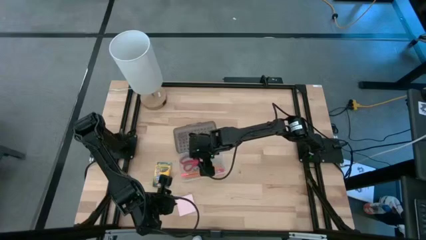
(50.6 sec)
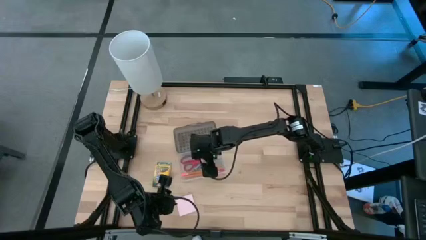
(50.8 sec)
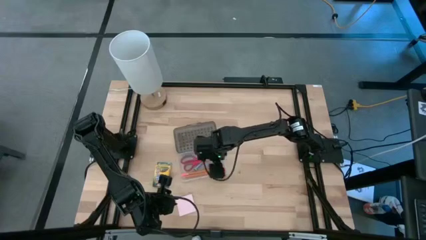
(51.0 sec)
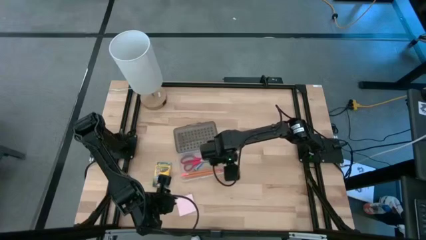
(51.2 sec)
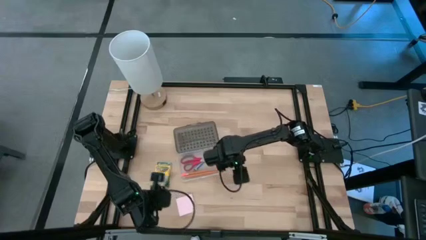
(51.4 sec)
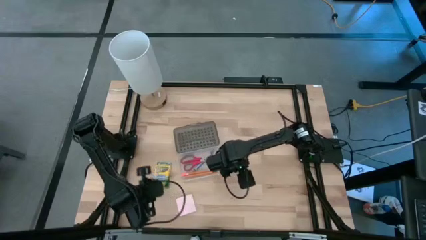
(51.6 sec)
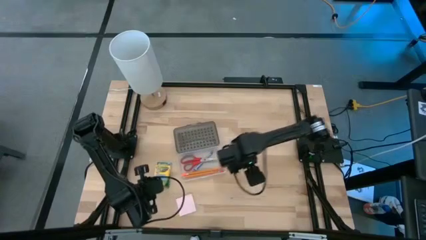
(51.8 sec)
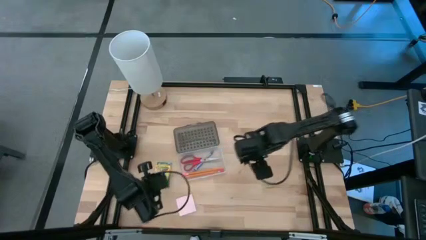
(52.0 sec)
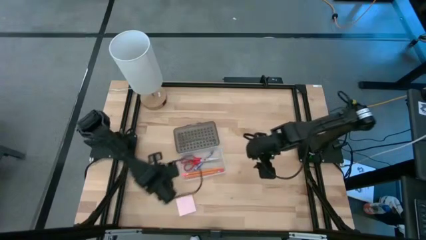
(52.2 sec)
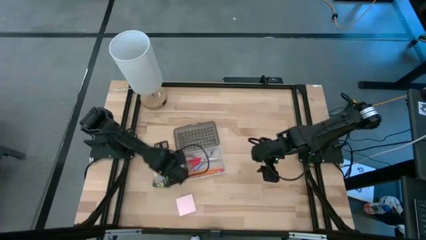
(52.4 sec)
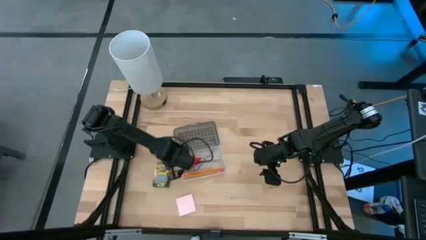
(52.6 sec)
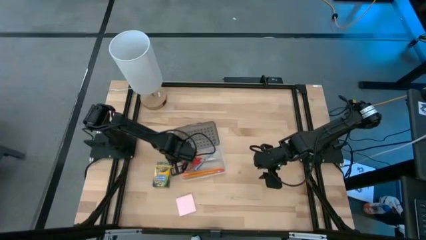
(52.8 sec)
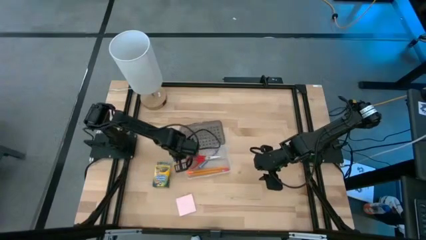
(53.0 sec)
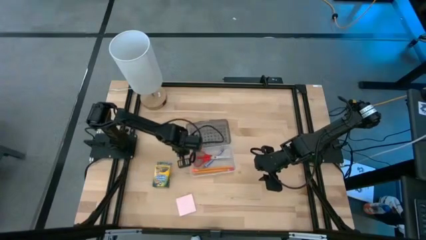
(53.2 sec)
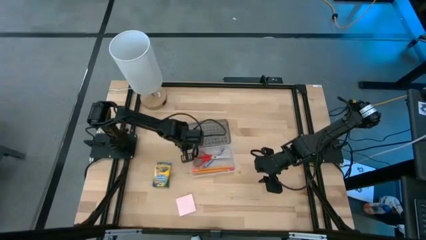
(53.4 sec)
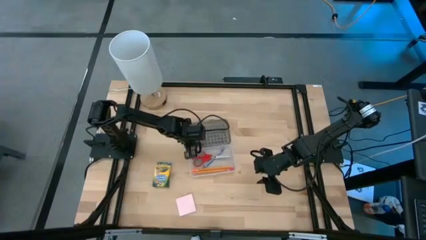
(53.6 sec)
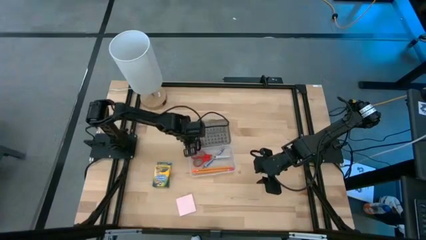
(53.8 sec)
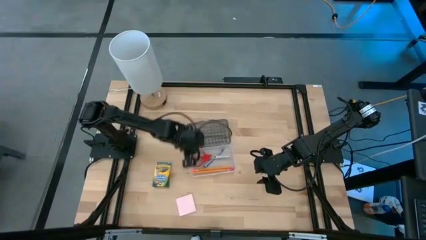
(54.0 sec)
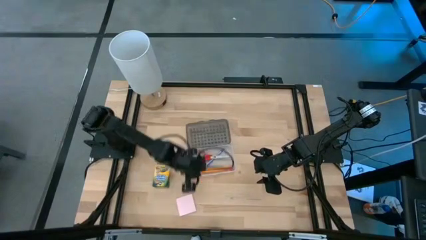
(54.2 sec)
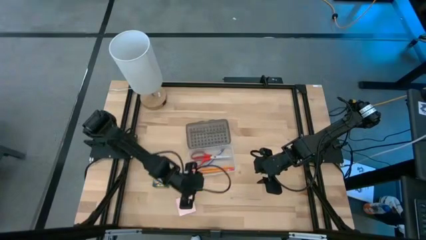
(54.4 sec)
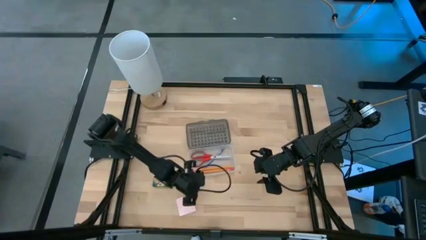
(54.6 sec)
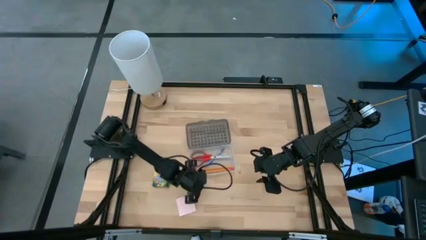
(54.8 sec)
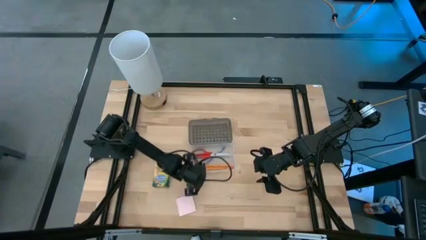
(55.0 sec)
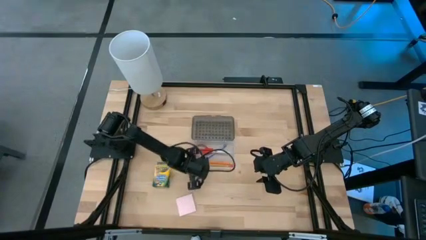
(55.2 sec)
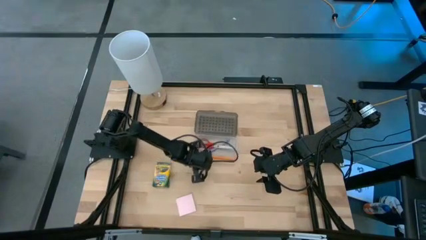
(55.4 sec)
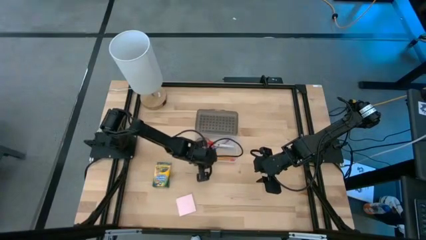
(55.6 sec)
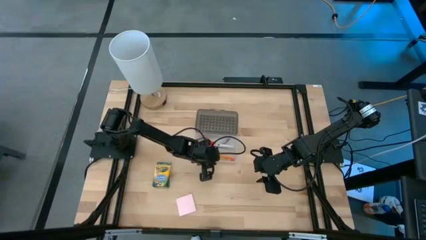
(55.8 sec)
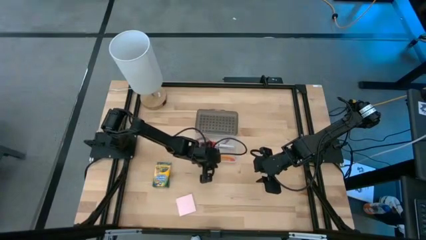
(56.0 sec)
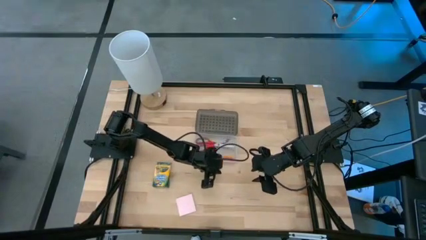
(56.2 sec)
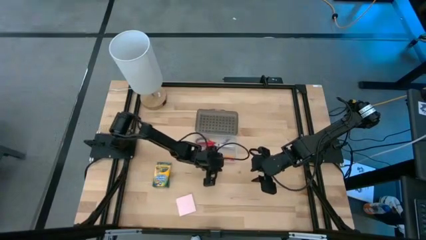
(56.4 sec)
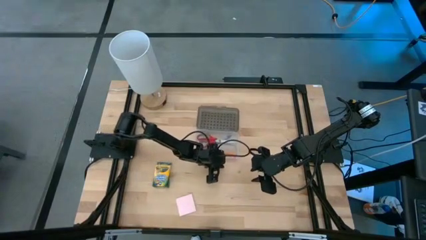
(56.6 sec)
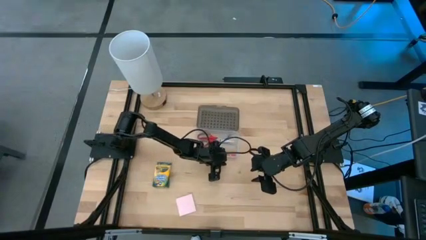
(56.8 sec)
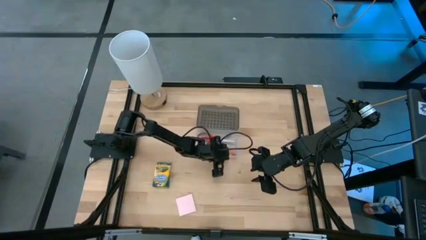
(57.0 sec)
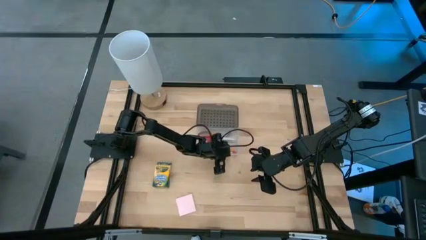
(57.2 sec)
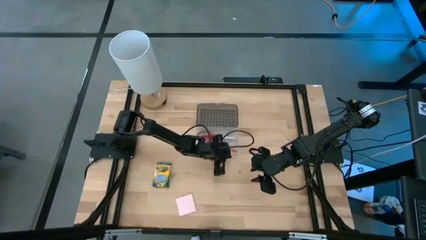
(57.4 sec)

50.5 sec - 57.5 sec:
Task: Pack school essentials
Adjust the gray supply box

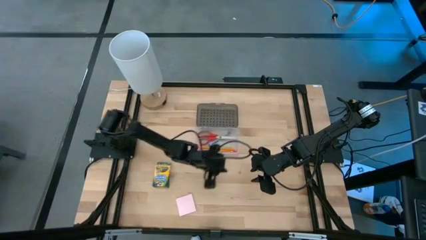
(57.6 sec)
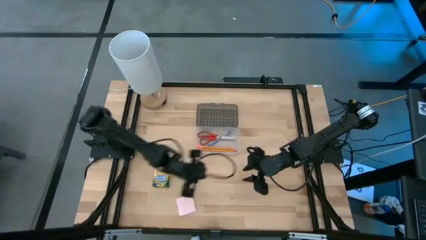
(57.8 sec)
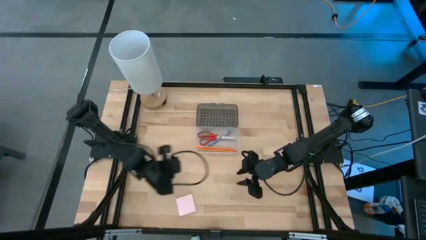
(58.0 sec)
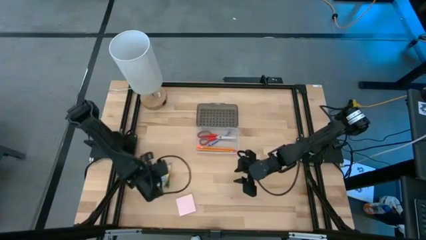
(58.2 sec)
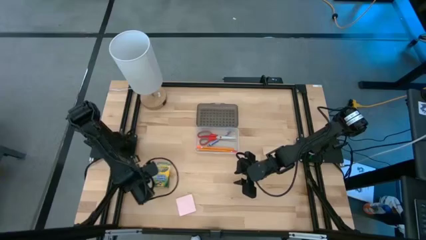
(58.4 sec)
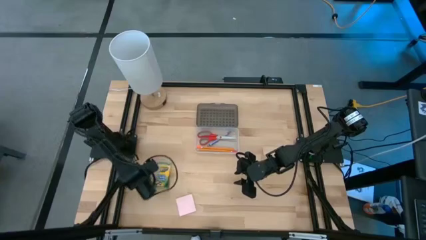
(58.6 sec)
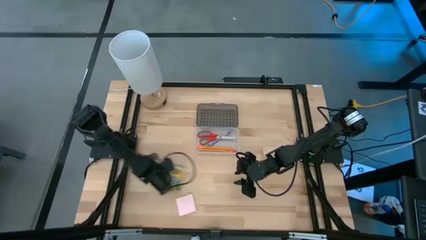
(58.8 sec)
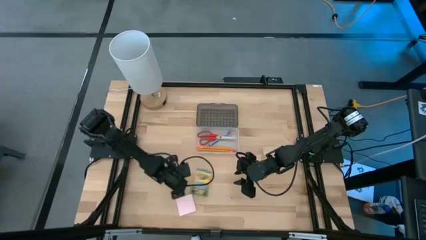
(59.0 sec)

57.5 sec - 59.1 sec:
Move the yellow crayon box to the center of the table

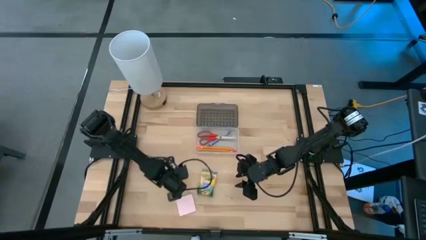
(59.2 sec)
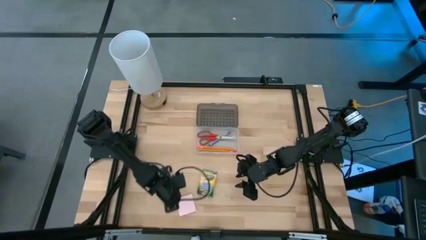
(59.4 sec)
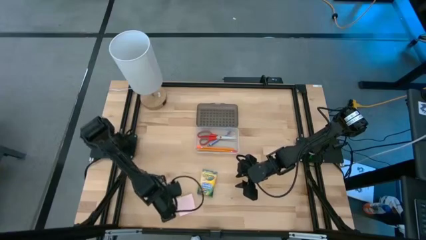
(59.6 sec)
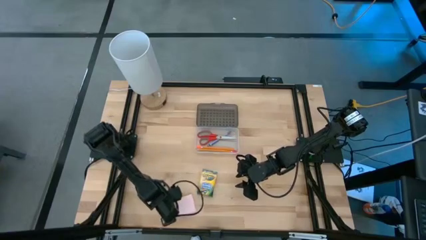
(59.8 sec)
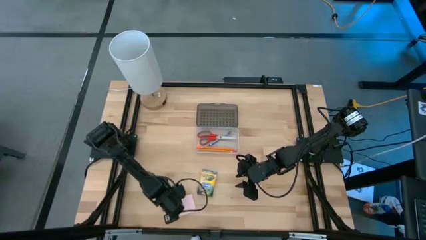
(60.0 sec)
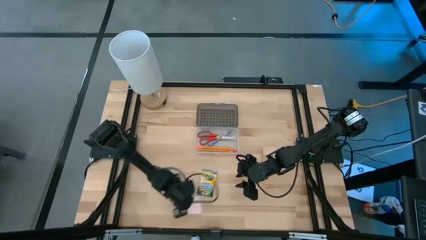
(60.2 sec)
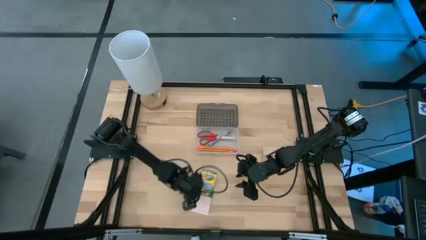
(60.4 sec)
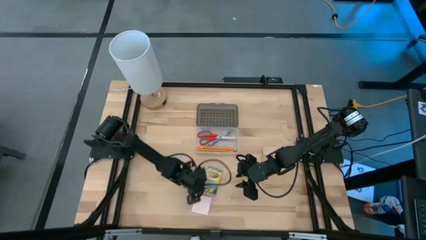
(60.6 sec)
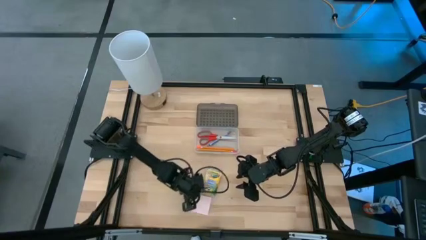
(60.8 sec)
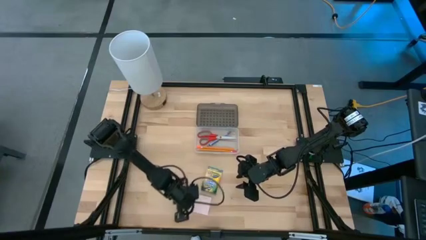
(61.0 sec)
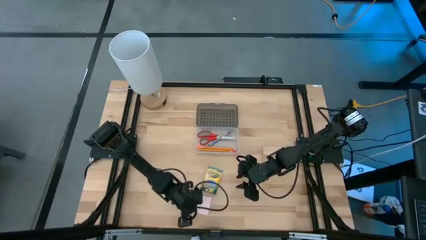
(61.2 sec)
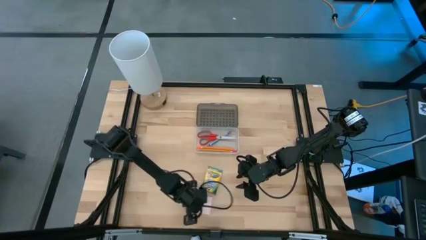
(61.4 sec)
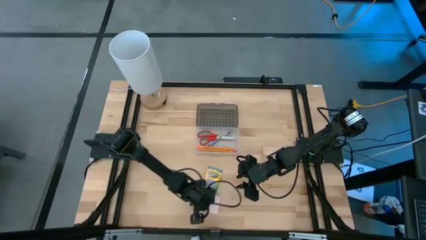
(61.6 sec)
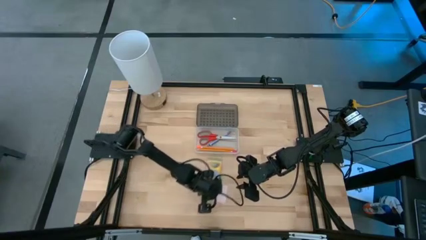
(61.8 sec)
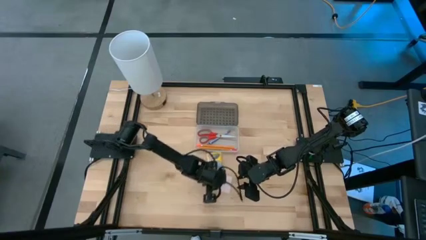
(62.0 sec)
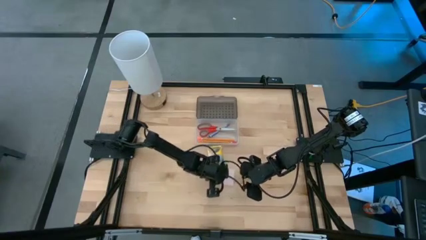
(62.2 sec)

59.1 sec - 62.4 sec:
Move the light pink sticky note to the center of the table

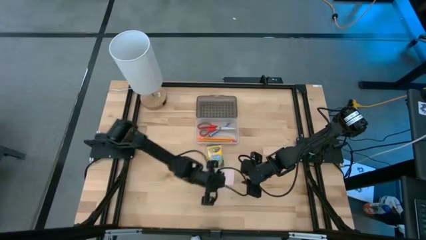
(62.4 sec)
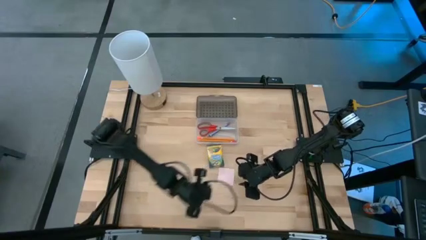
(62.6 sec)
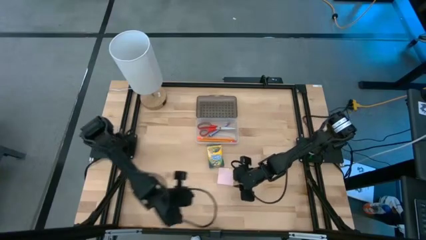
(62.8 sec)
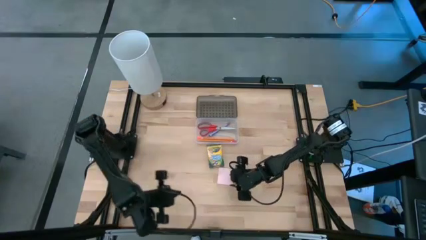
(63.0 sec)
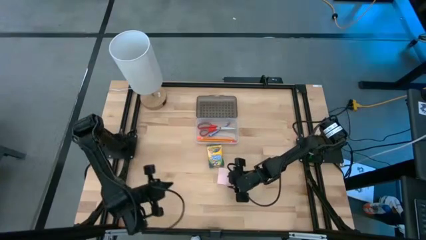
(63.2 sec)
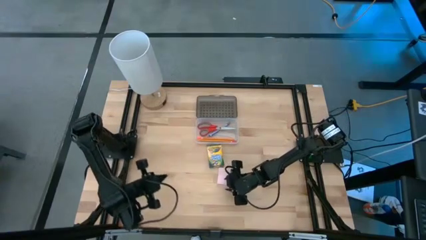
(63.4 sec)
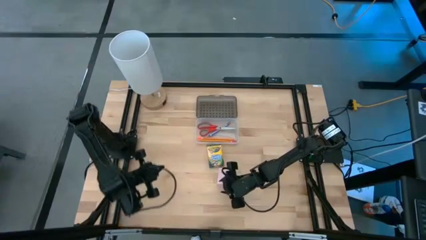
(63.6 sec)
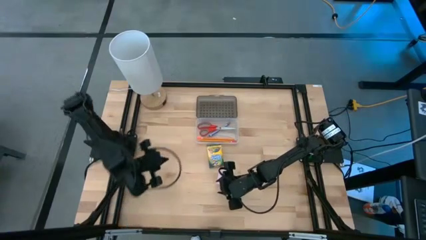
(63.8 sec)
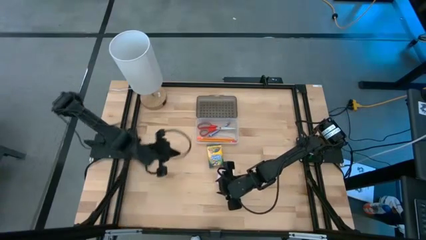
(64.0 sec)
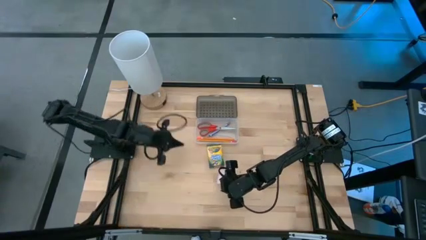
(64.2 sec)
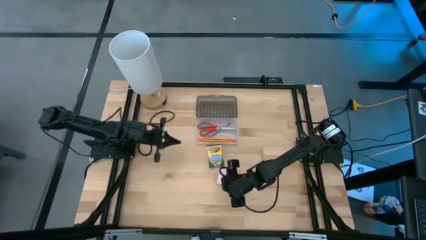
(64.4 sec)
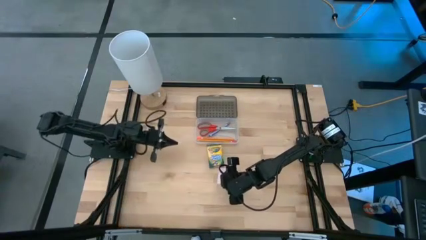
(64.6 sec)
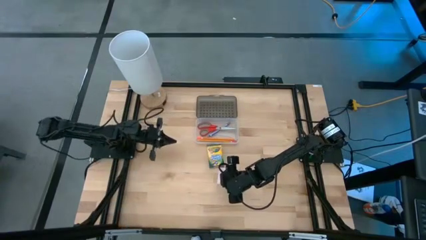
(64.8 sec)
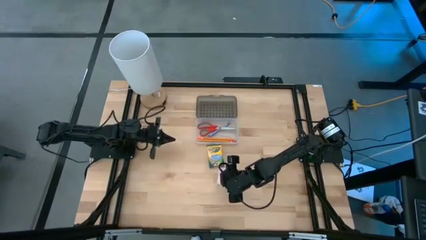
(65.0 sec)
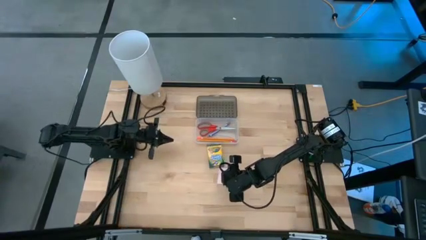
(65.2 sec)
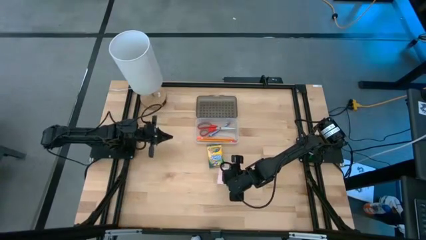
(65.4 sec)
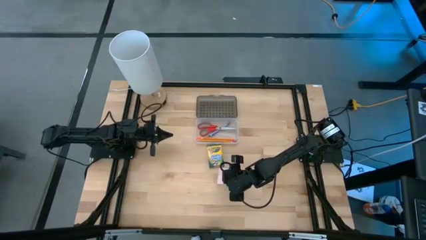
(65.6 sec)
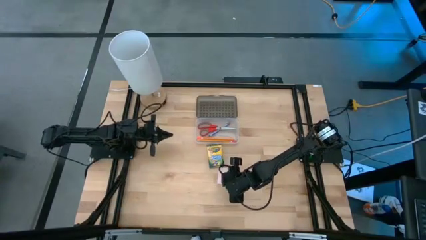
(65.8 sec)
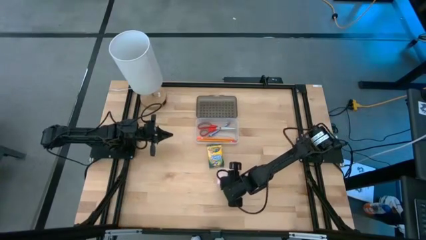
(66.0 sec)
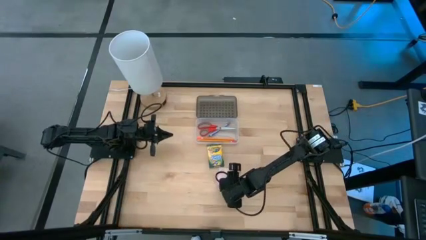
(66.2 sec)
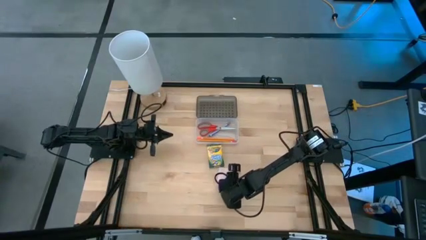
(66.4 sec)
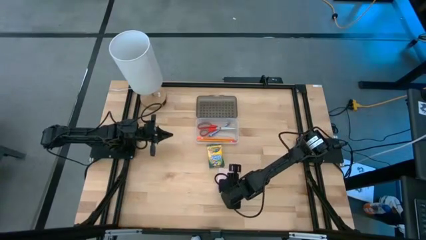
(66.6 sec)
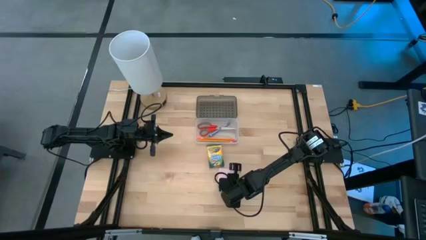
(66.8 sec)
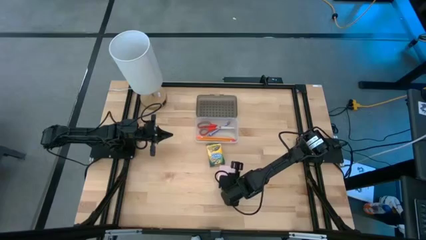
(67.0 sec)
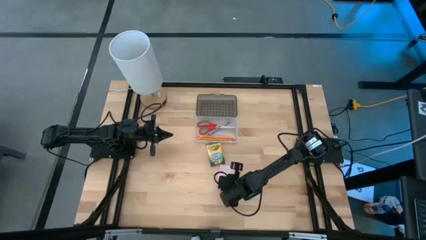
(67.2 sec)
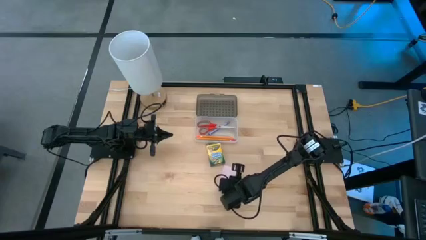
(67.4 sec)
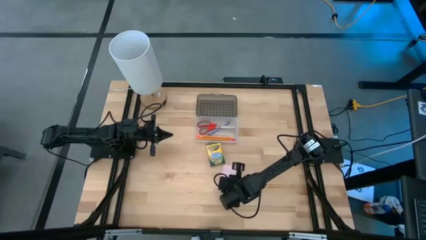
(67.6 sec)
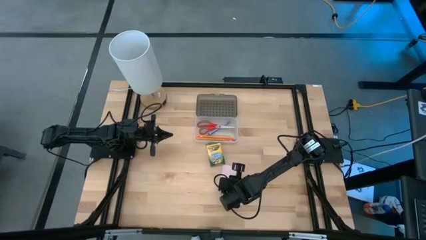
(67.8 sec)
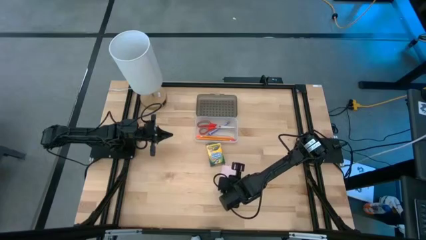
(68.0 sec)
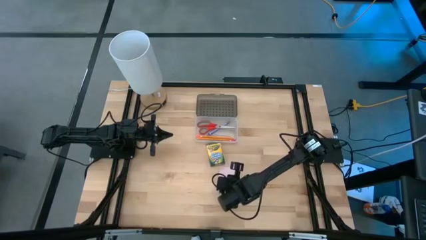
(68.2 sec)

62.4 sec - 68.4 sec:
Put the light pink sticky note into the gray supply box
